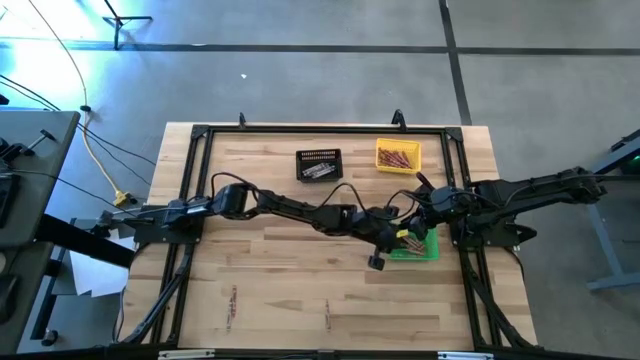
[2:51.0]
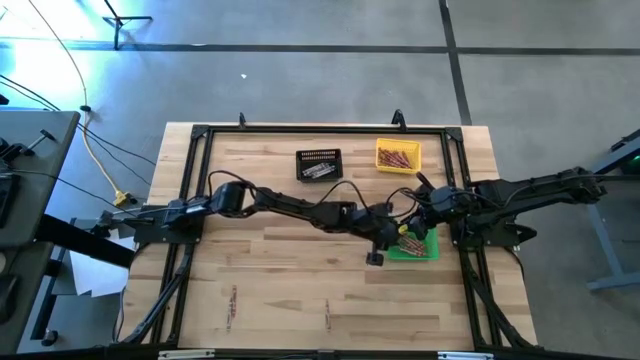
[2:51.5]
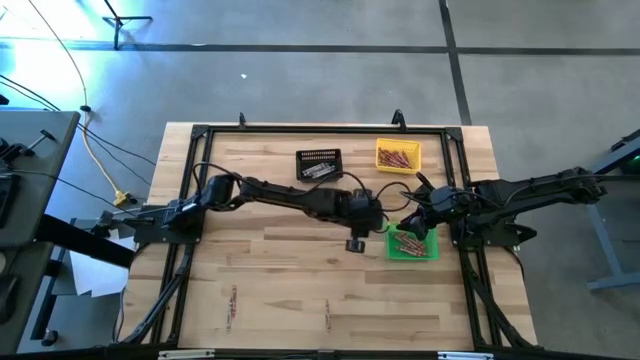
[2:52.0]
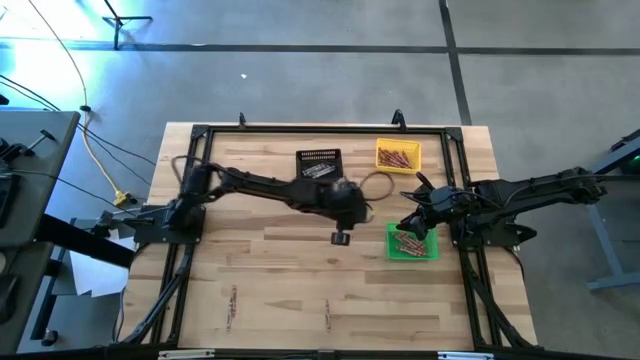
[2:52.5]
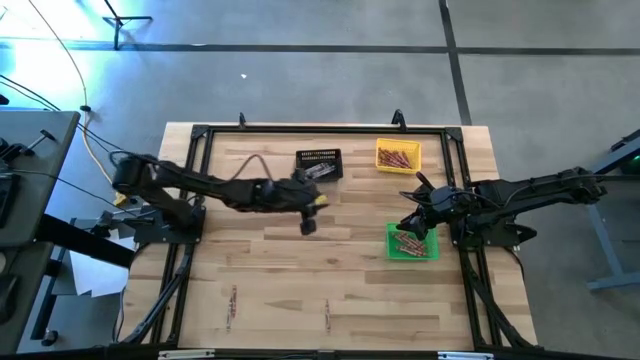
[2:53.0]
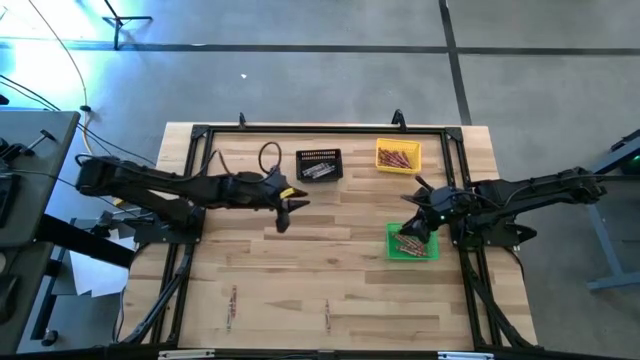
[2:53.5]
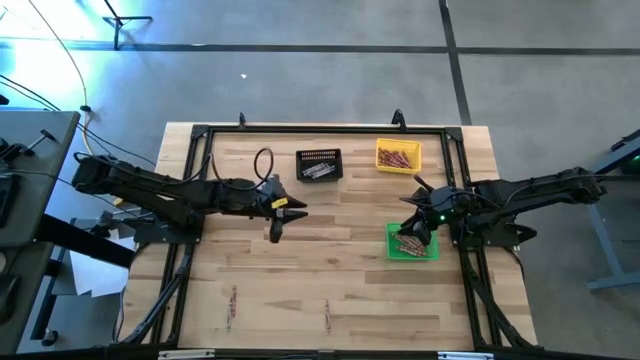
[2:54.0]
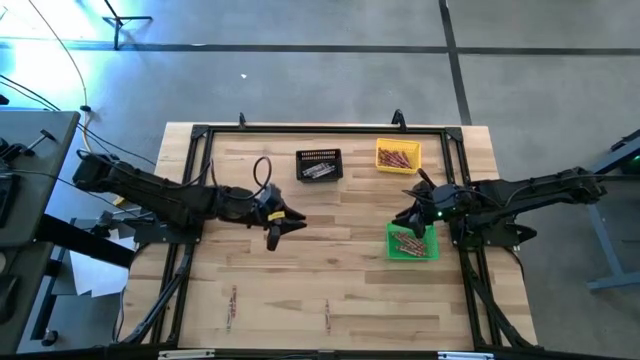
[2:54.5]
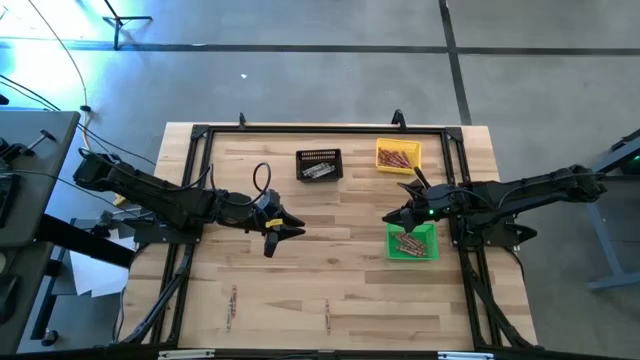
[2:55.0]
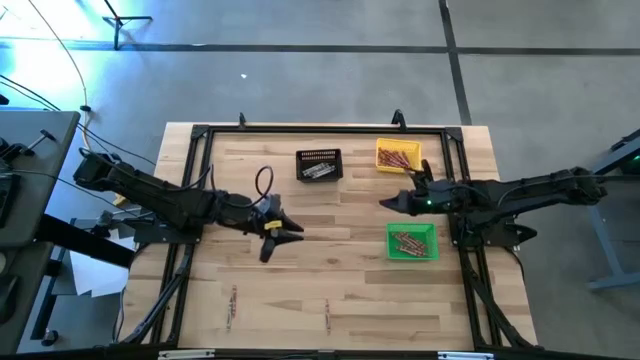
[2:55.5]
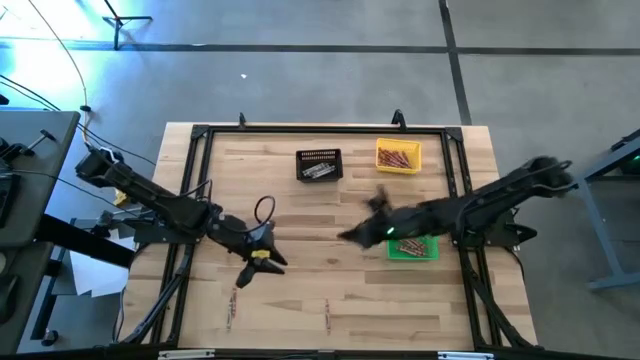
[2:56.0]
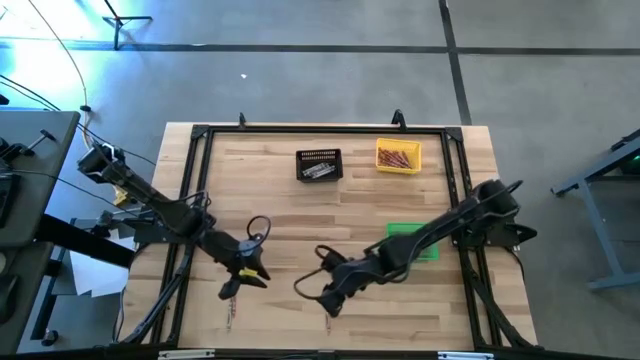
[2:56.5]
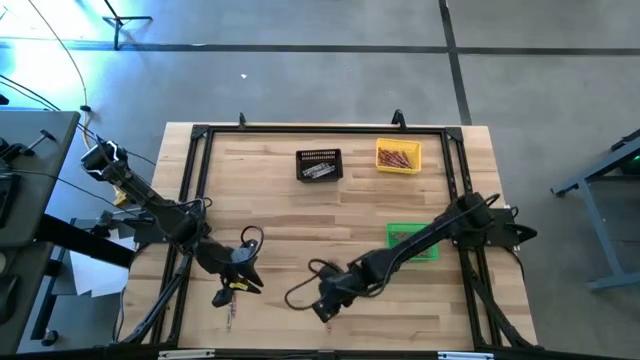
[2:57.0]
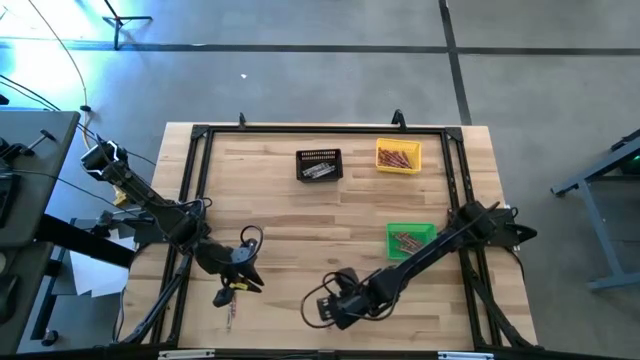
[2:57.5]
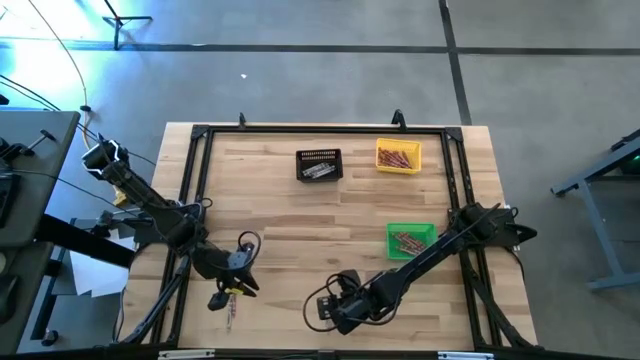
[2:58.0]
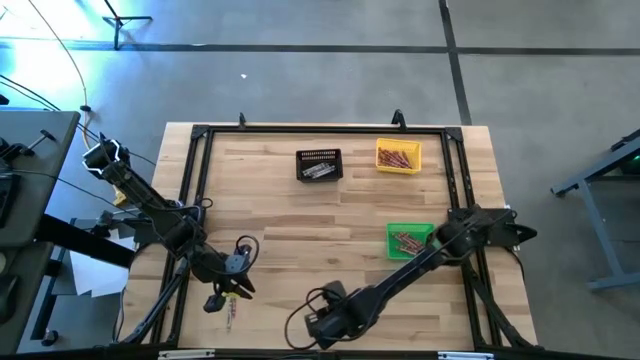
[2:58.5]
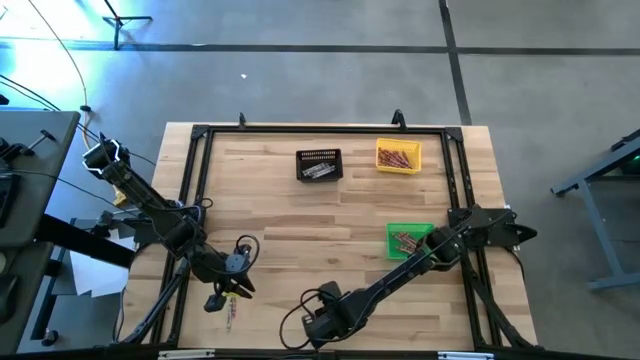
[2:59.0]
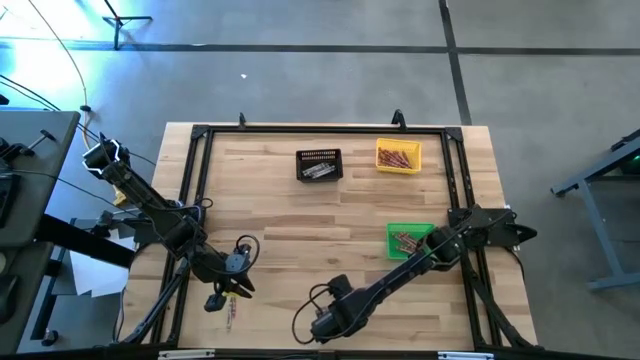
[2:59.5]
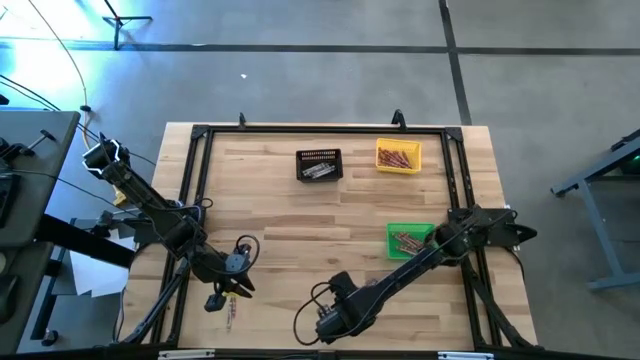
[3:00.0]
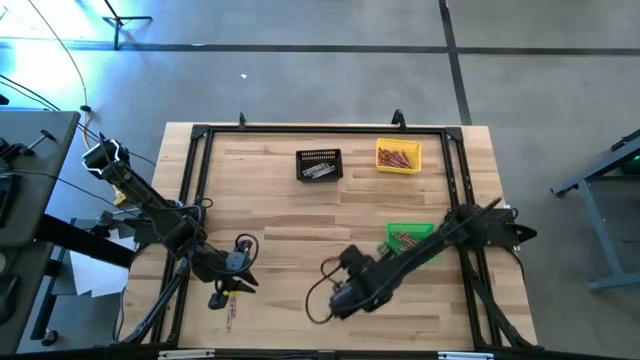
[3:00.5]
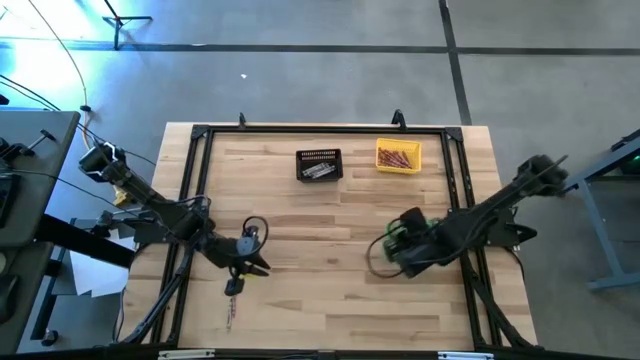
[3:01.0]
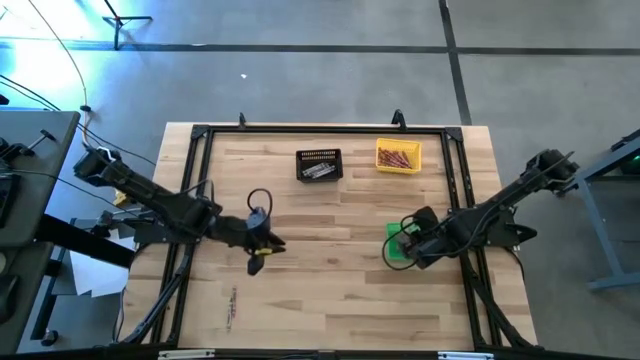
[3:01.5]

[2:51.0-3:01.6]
Task: Sort crayons
Put the pink crayon into the green basket

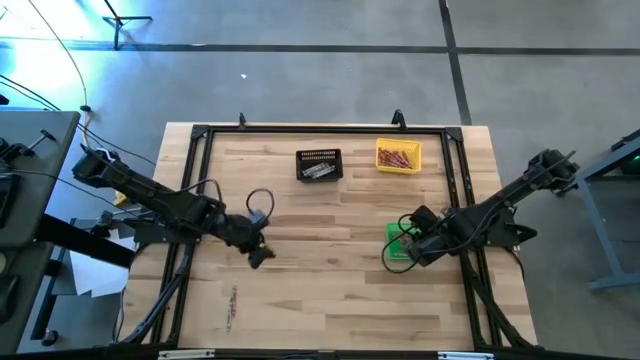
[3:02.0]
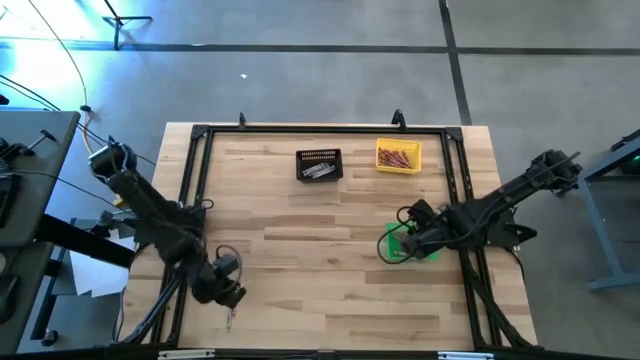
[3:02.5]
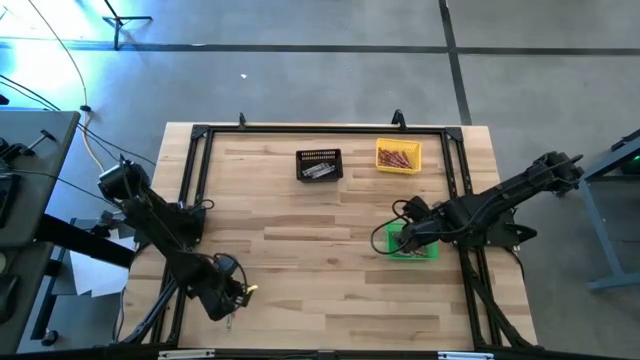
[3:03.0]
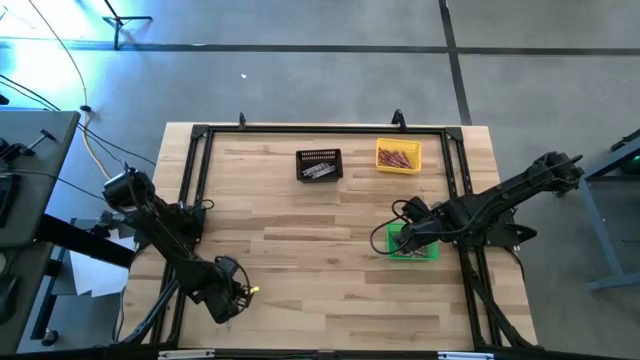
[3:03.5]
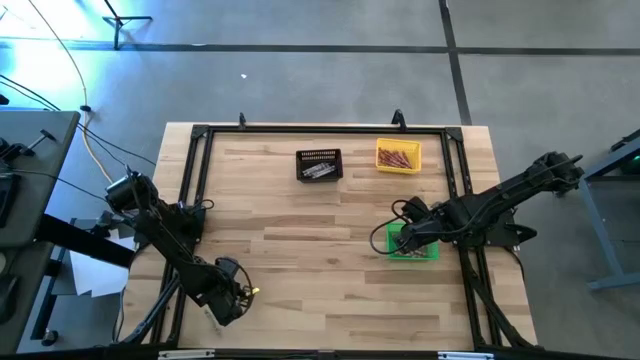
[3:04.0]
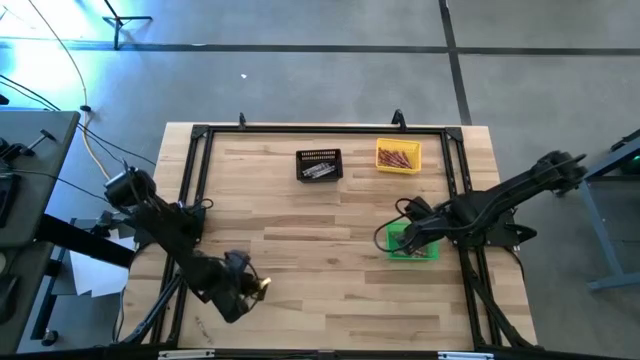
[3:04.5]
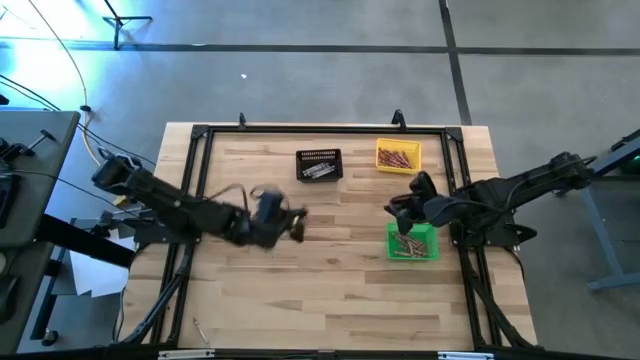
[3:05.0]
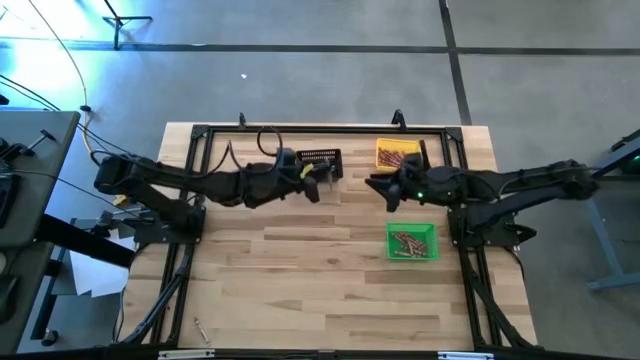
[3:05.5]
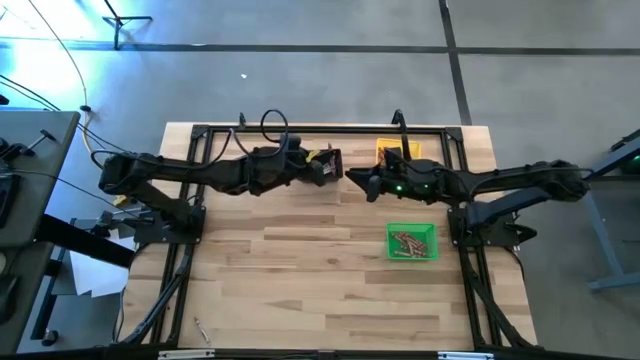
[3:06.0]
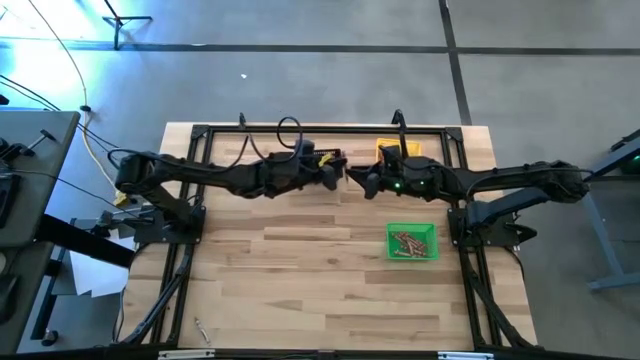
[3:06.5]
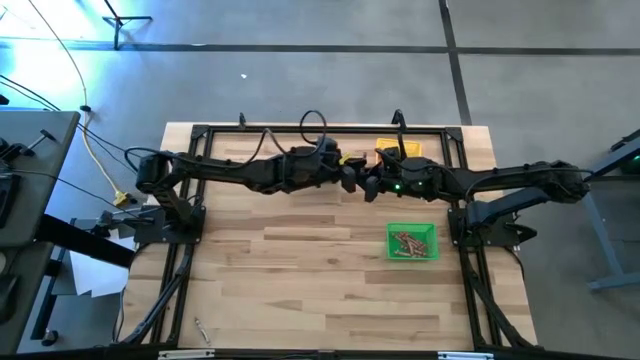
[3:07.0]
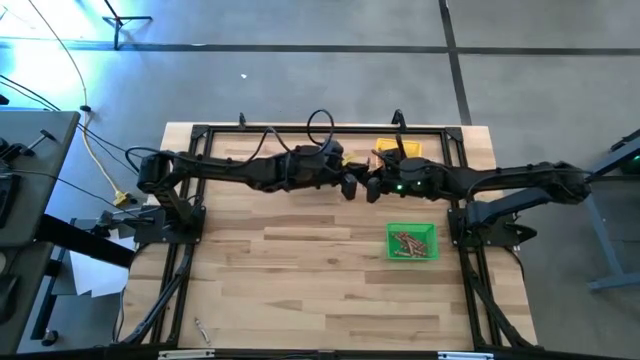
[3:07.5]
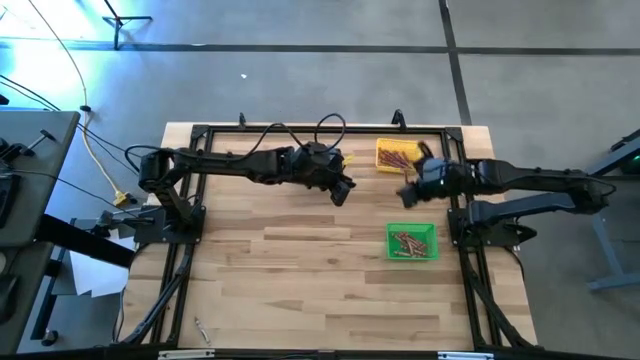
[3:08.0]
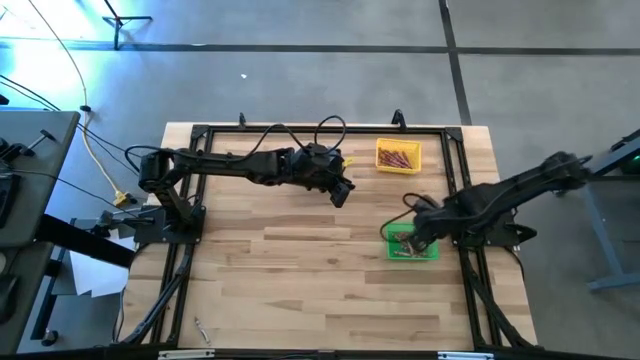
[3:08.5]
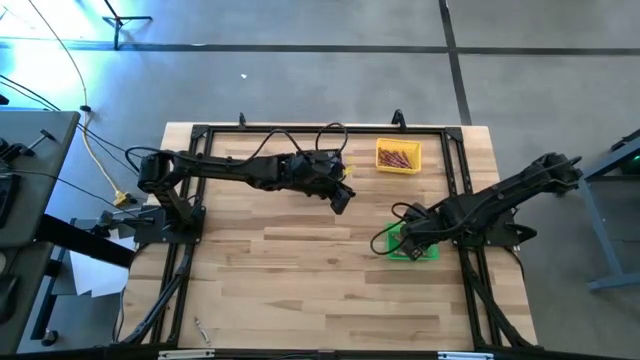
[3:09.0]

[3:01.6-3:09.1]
Put the pink crayon into the green basket

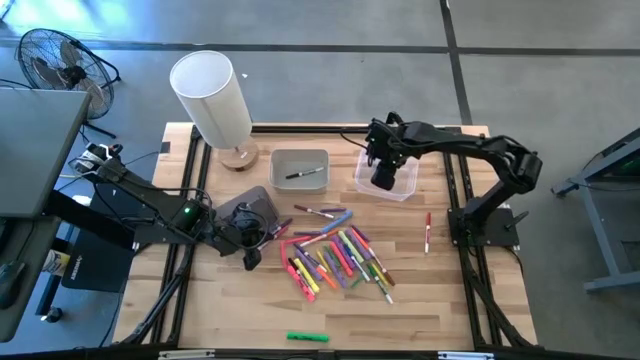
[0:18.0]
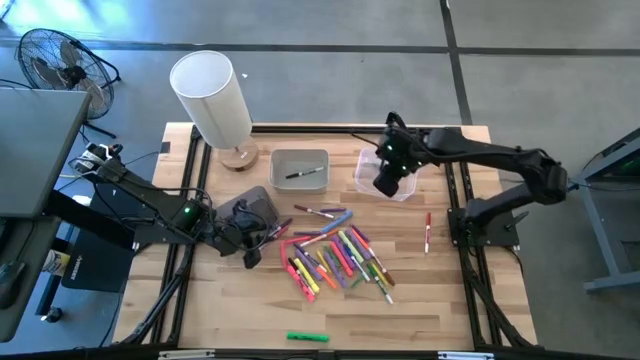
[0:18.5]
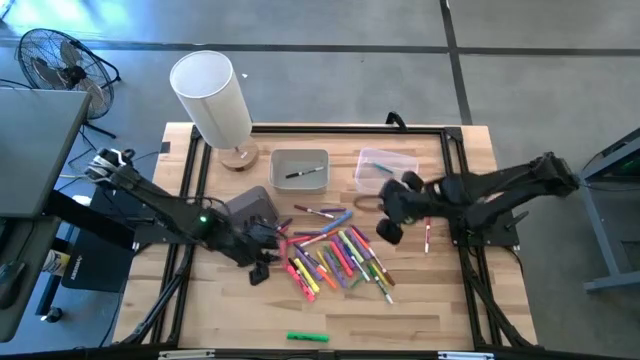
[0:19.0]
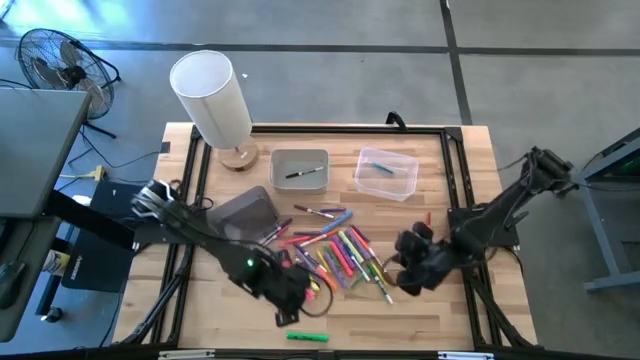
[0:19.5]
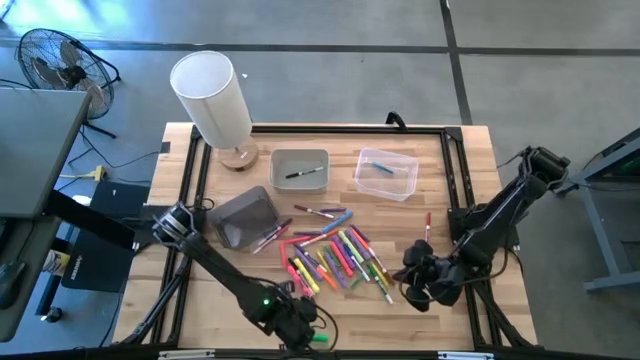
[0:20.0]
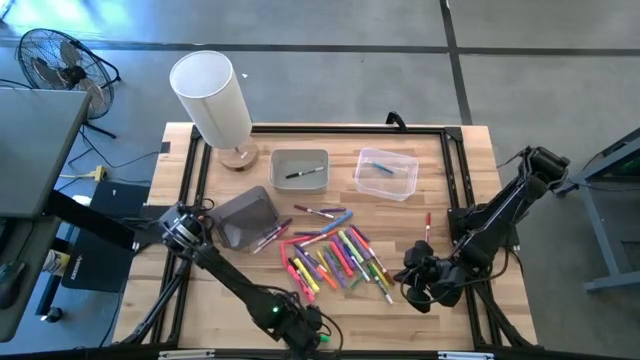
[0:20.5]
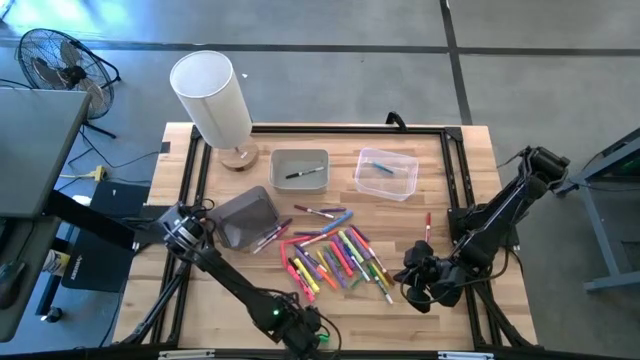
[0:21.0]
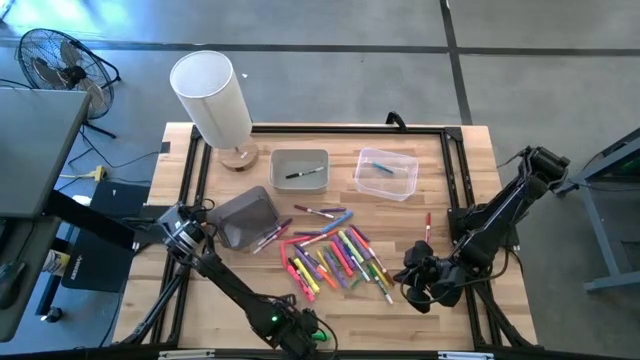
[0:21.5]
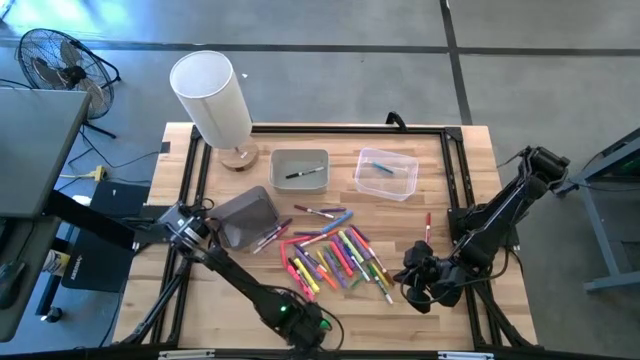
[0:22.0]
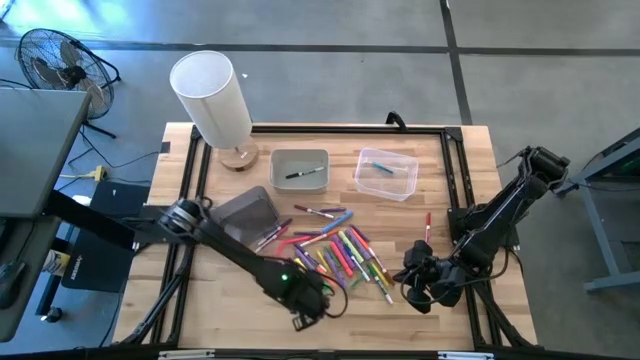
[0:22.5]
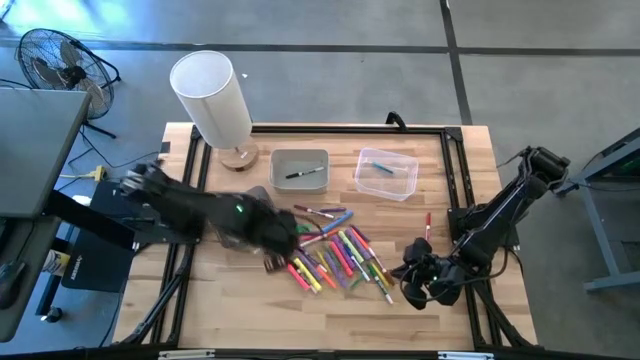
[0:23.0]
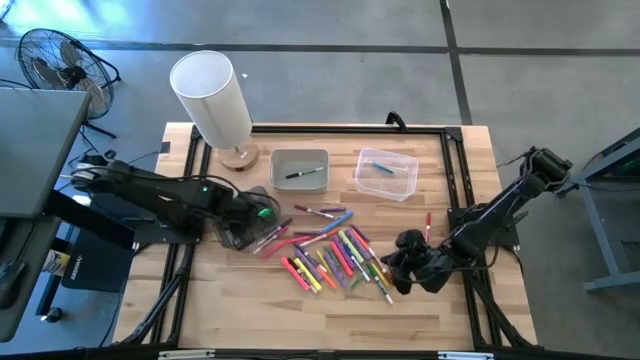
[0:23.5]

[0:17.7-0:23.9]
Task: Pick & Place Markers
Put the green highlighter pen into the black bin
